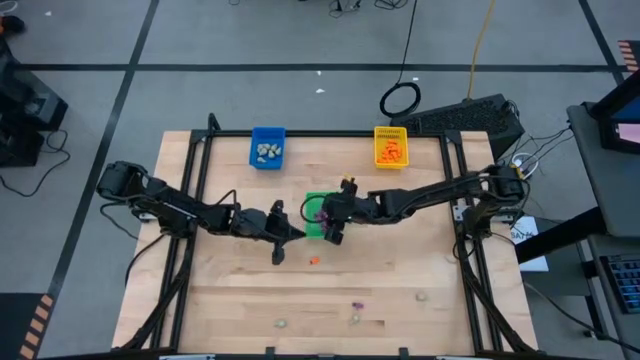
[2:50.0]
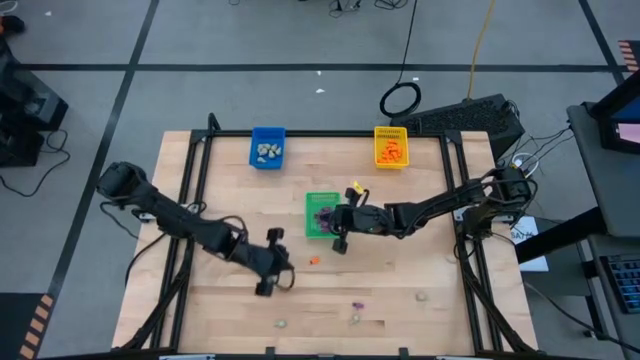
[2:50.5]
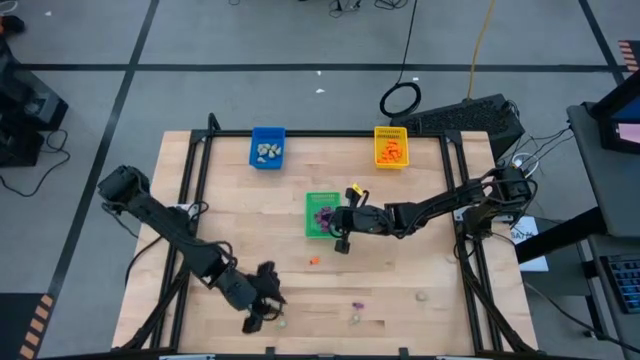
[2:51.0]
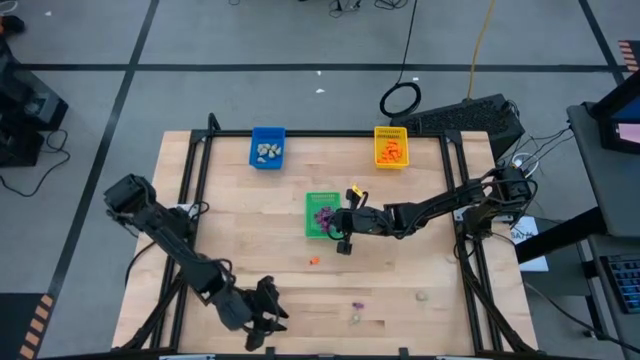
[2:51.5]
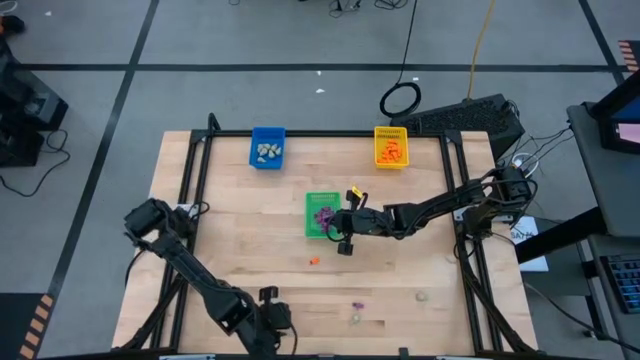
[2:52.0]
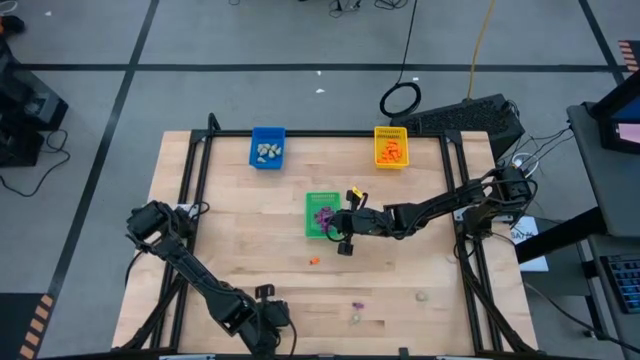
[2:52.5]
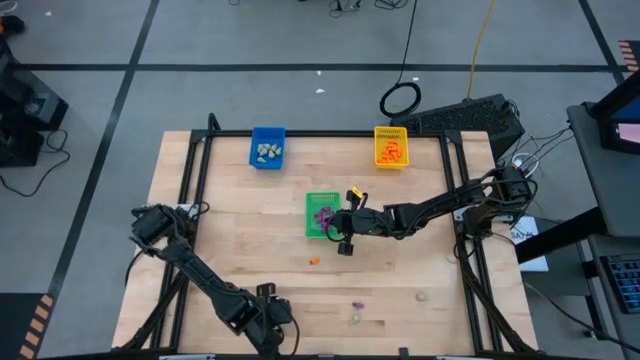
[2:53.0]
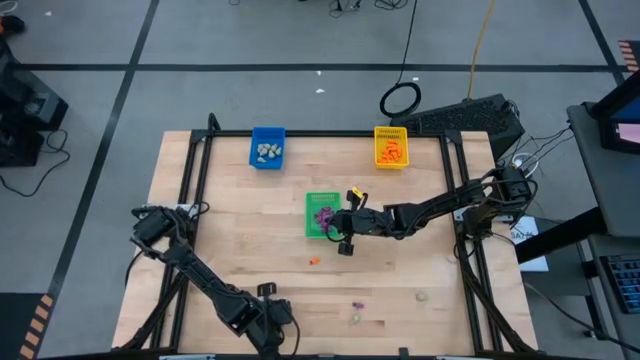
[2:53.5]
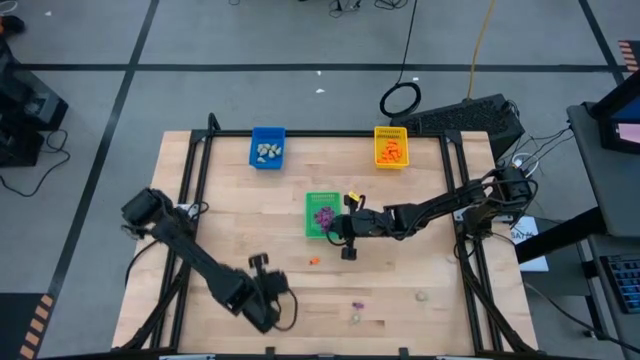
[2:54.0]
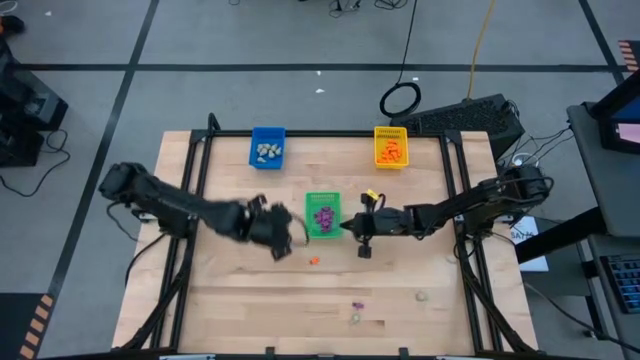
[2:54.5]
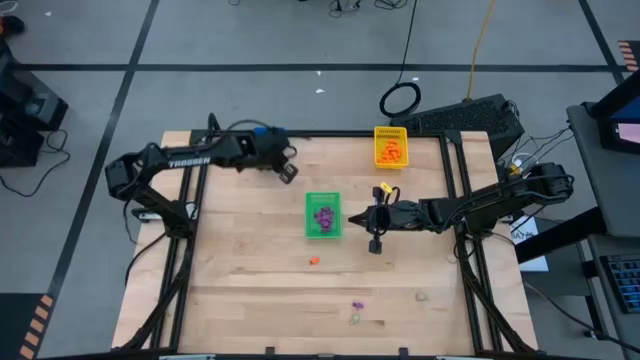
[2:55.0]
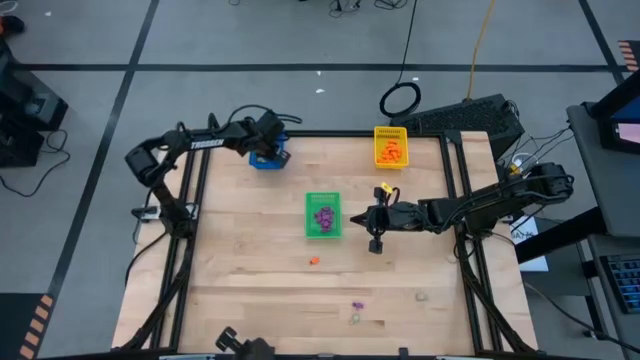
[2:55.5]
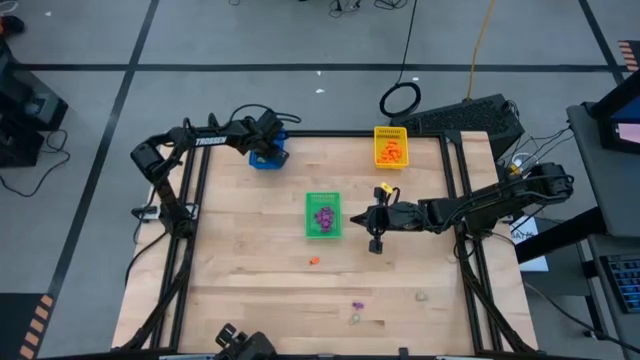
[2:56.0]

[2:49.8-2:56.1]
Task: Sort Halloween decoration
Put the white skull toy into the blue bin

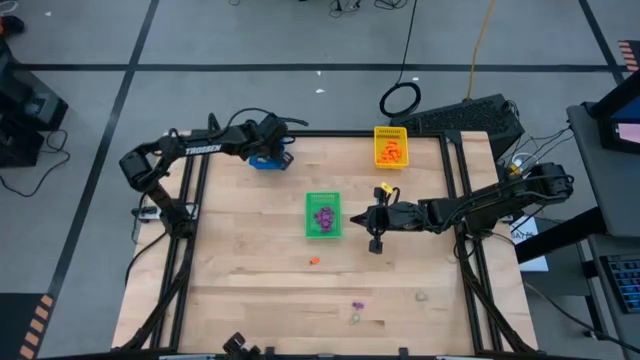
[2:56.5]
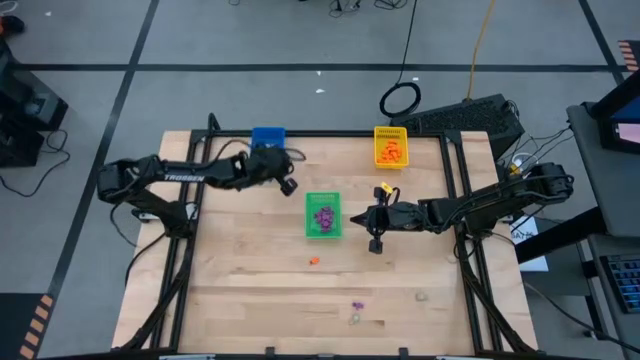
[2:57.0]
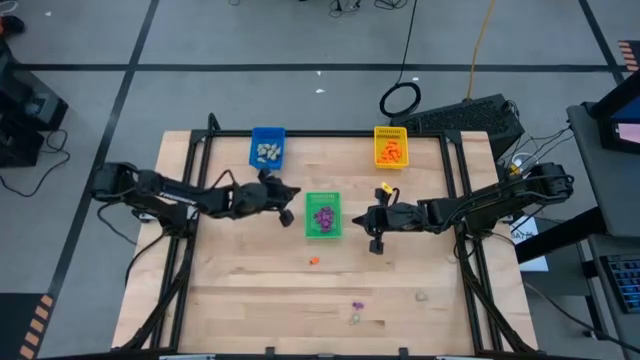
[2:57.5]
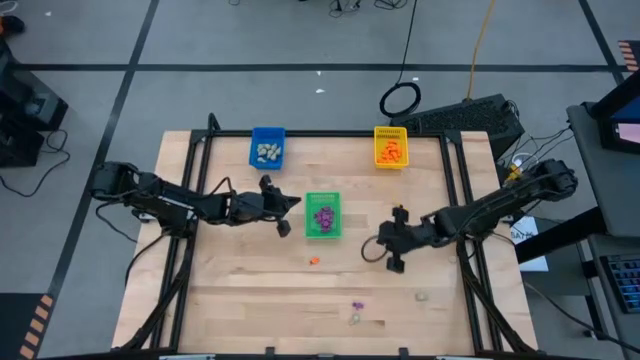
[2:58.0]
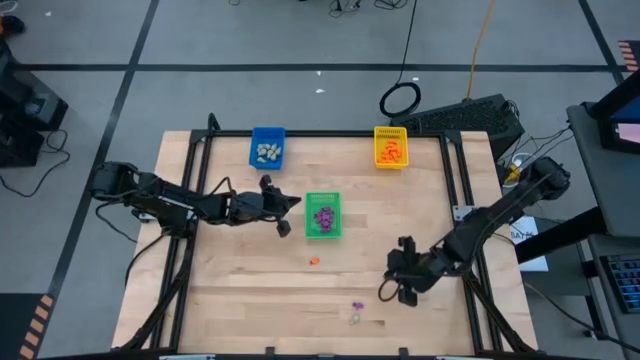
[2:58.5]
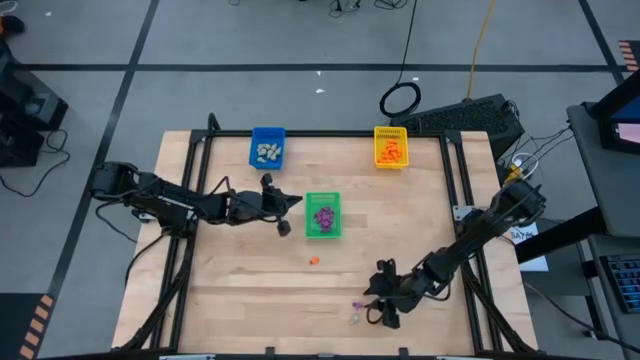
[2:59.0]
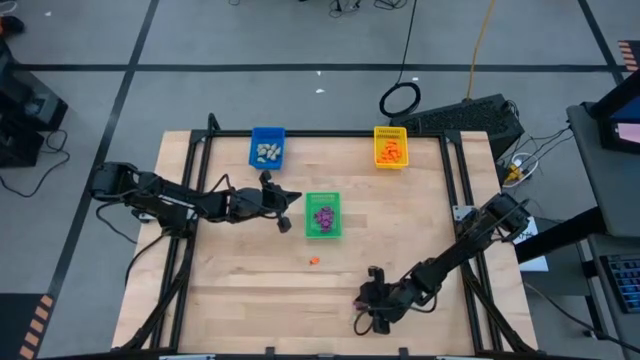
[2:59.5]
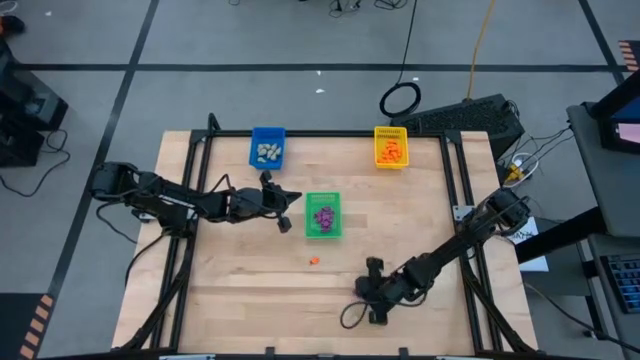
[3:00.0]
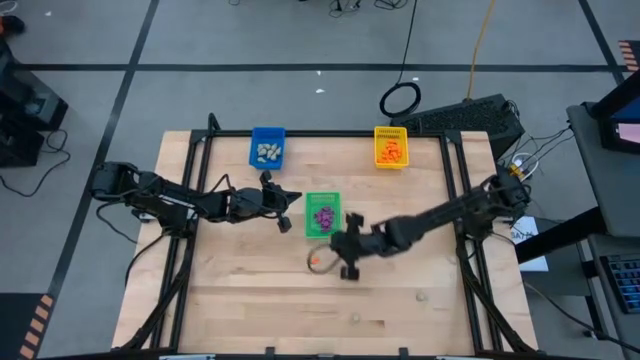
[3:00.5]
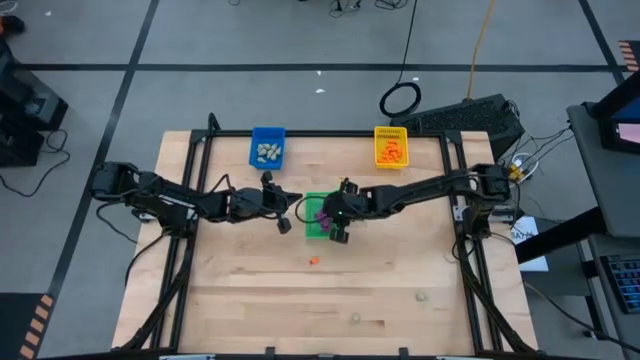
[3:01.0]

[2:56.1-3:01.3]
Put the purple skeleton toy into the green bin

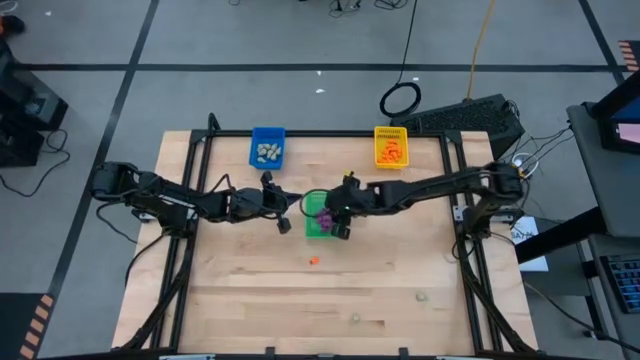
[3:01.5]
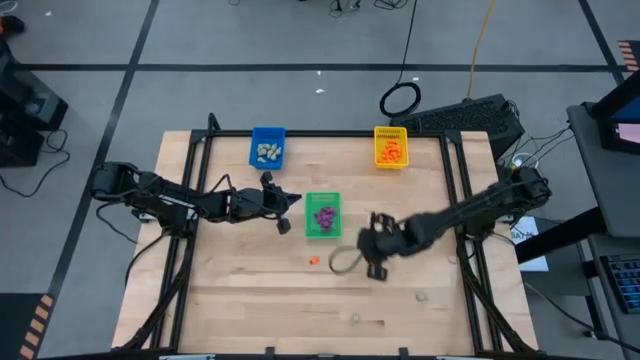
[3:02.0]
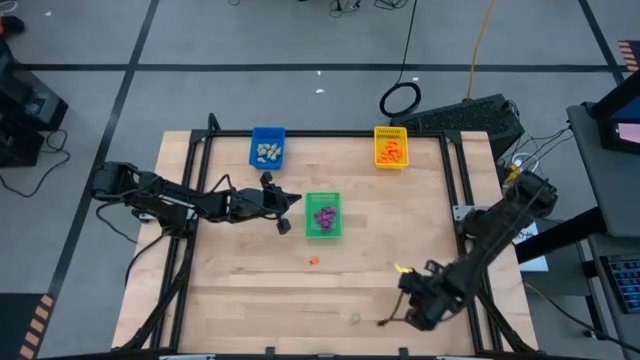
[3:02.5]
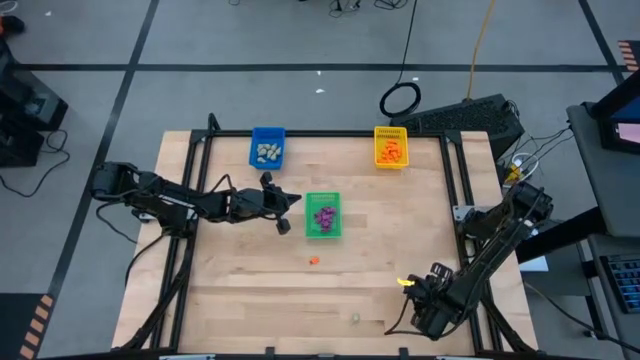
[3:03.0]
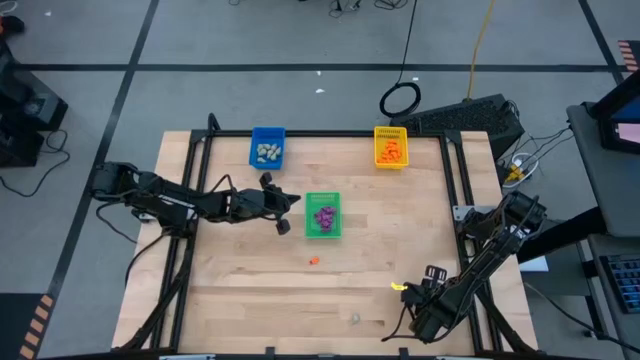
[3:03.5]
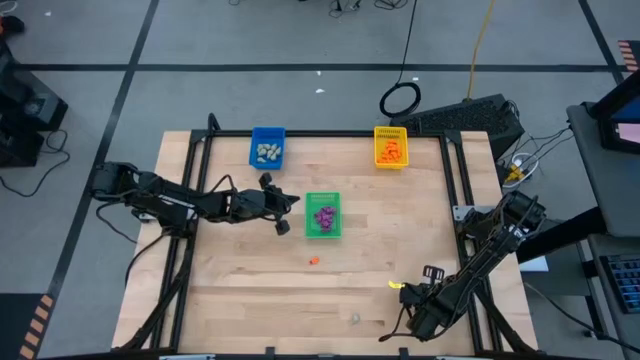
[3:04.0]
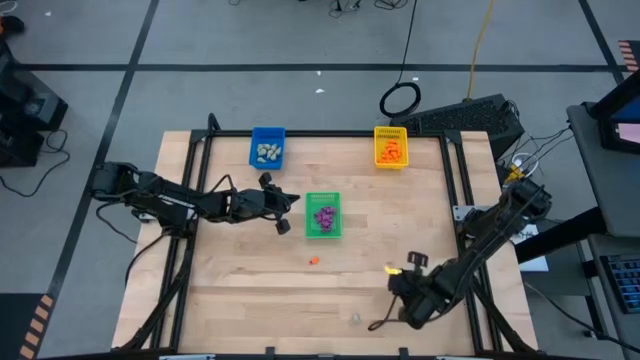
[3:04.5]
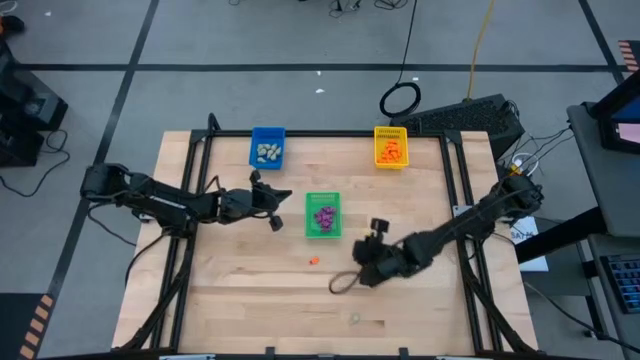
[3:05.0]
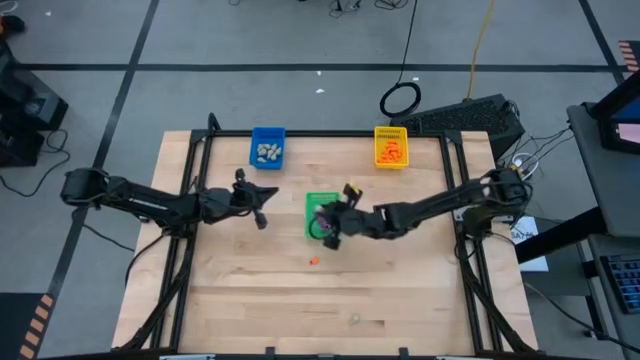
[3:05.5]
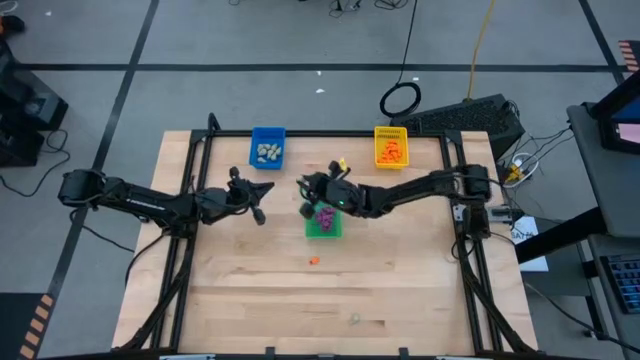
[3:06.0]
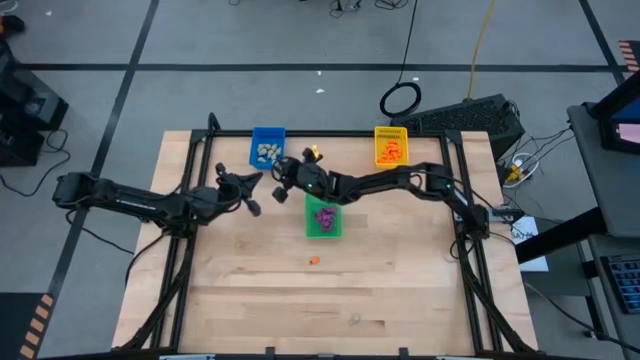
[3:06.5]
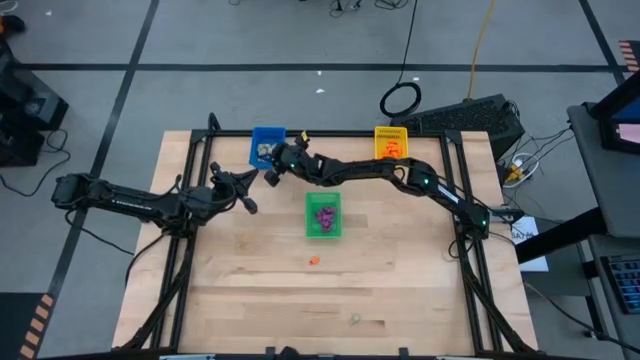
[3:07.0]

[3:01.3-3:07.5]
Put the white skull toy into the blue bin

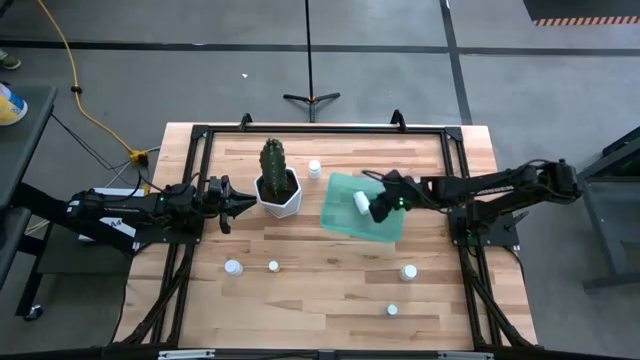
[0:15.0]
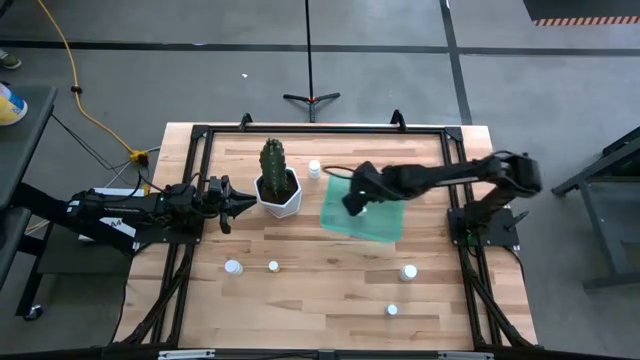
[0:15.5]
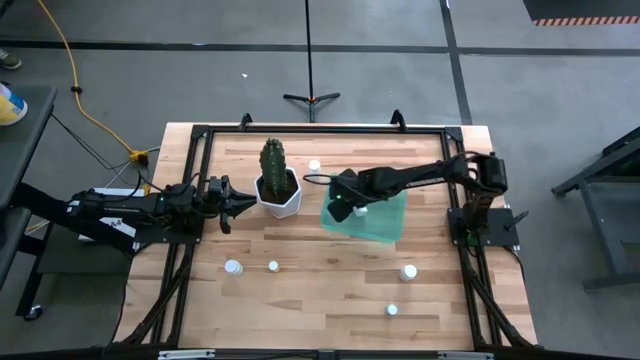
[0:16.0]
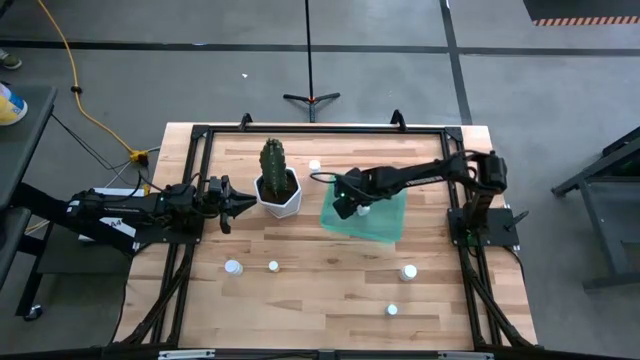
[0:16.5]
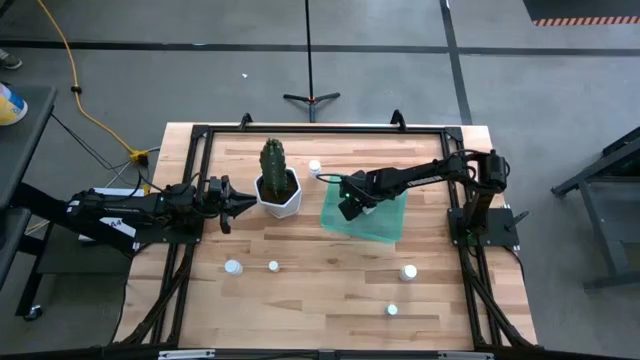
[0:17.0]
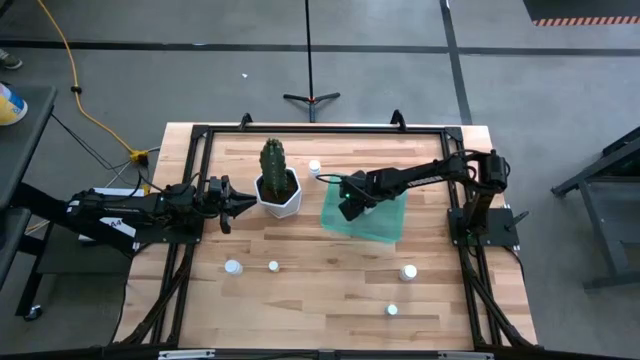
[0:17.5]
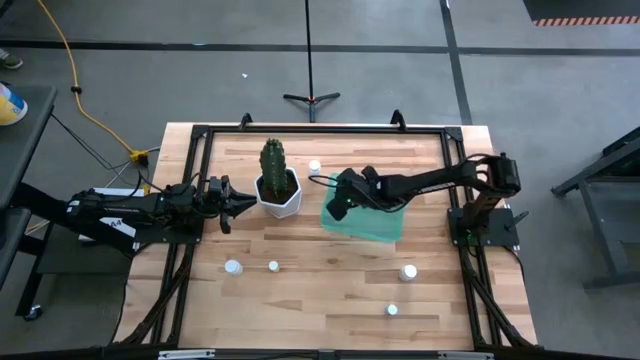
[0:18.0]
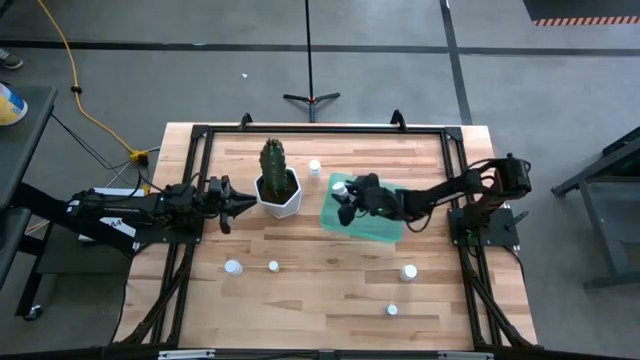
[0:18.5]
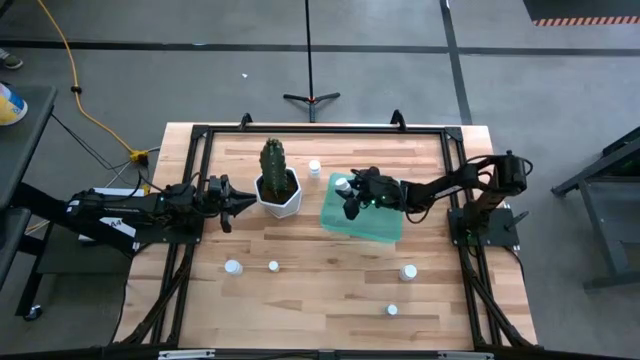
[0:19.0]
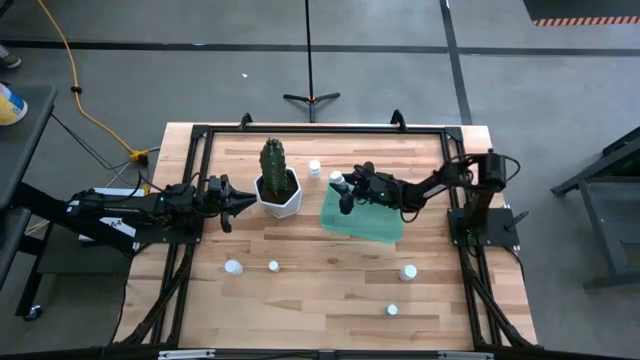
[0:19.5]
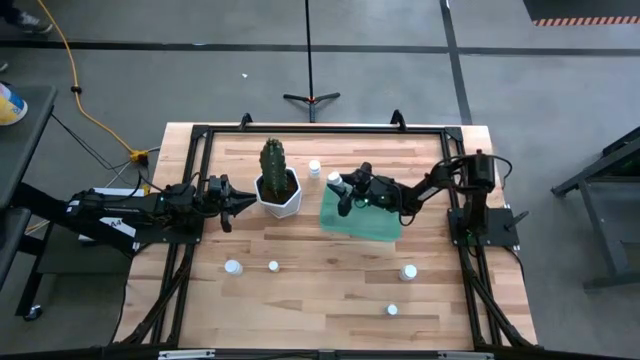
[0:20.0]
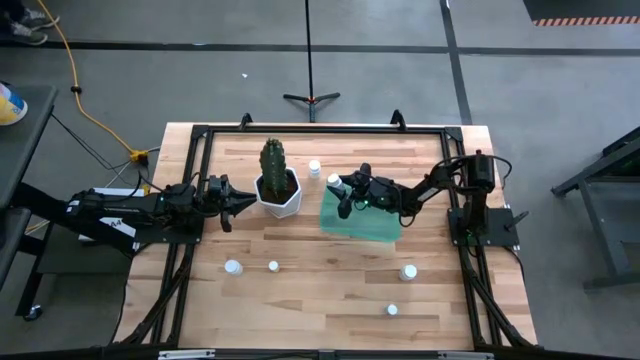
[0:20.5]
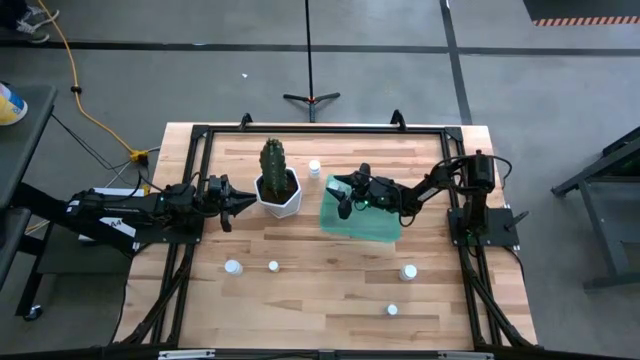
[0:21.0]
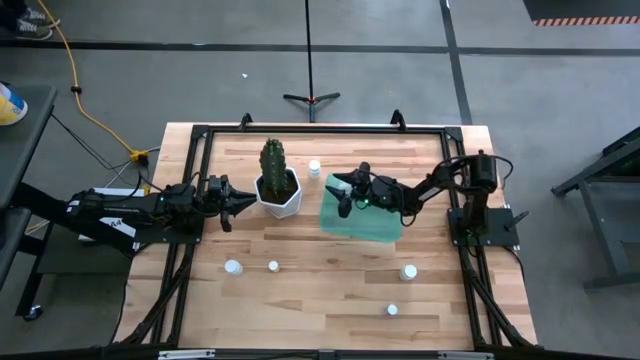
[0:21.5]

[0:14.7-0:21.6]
Task: Pick and place pill bottles into a basket
Put the white pill bottle into the light green bin
